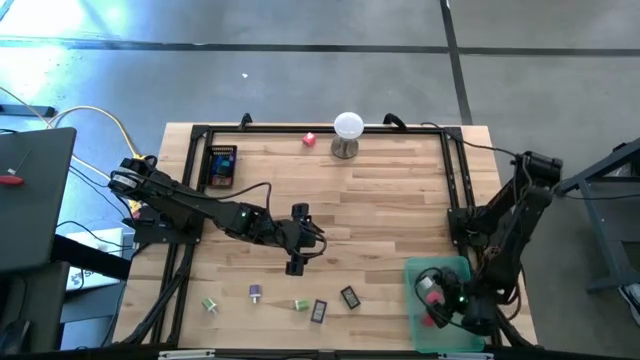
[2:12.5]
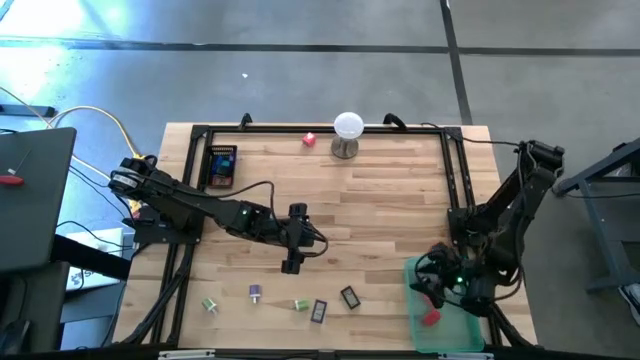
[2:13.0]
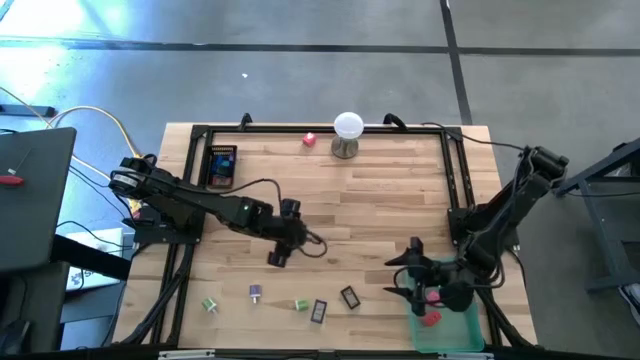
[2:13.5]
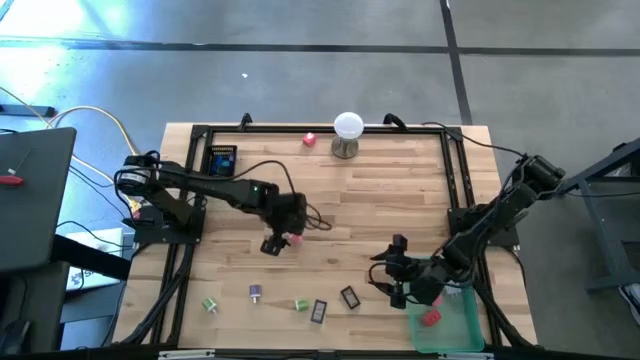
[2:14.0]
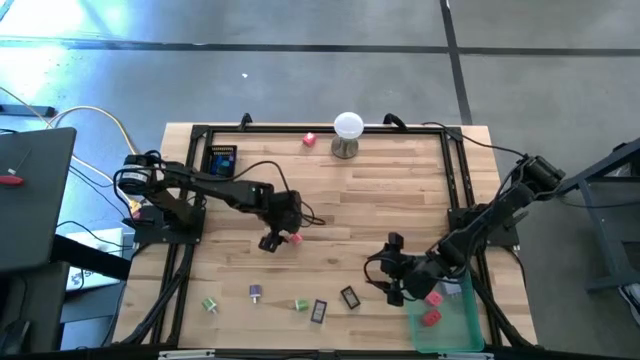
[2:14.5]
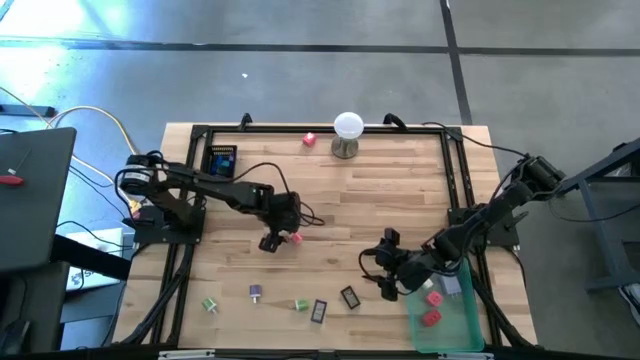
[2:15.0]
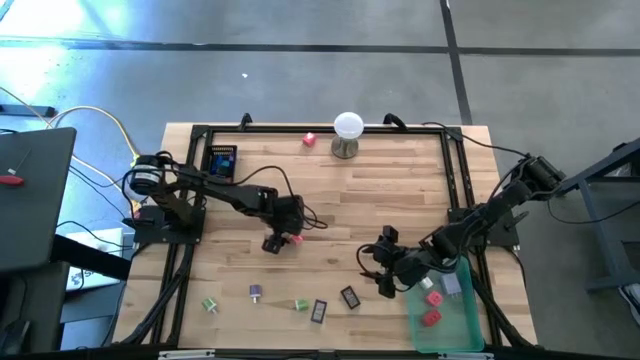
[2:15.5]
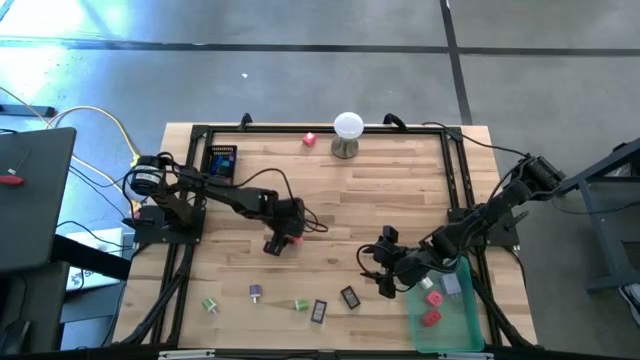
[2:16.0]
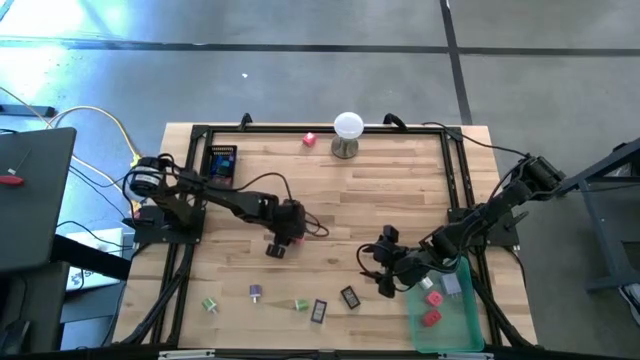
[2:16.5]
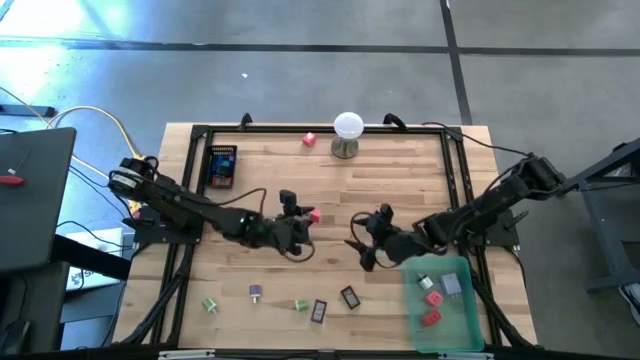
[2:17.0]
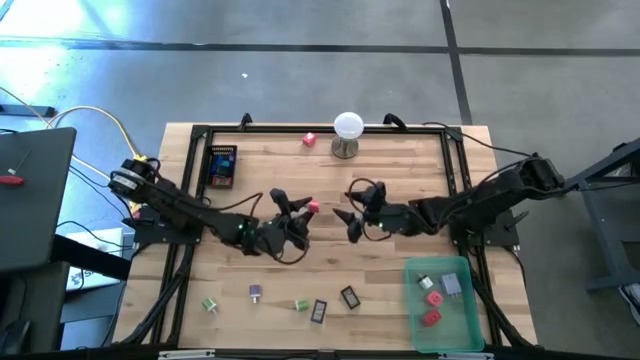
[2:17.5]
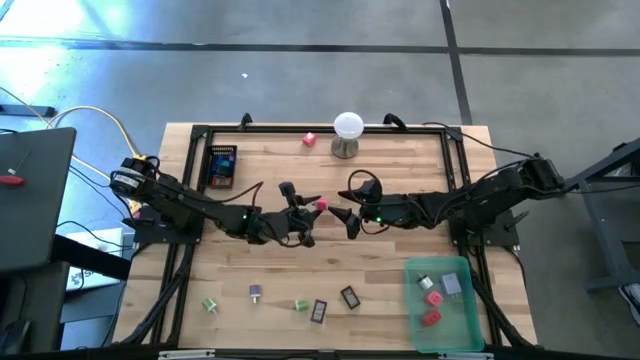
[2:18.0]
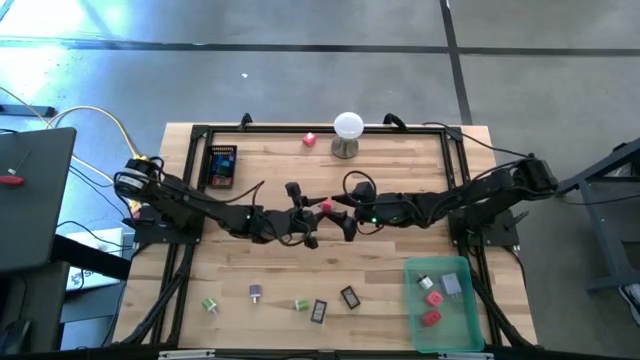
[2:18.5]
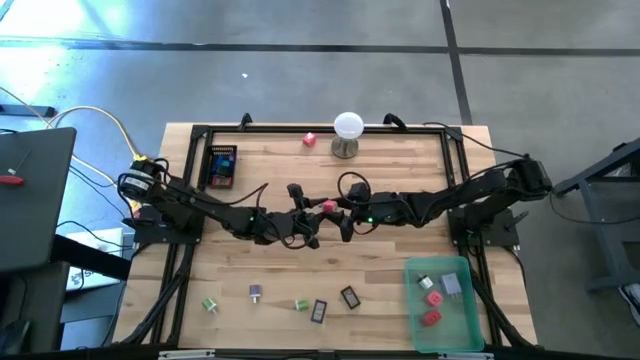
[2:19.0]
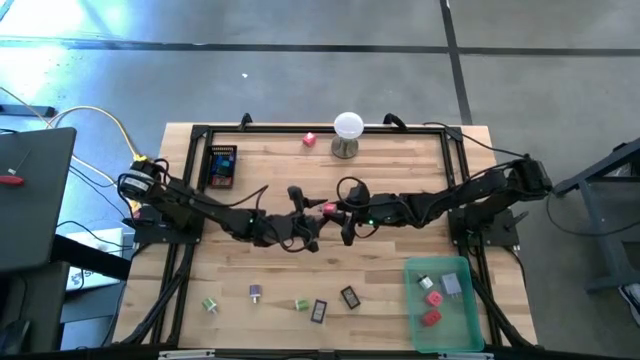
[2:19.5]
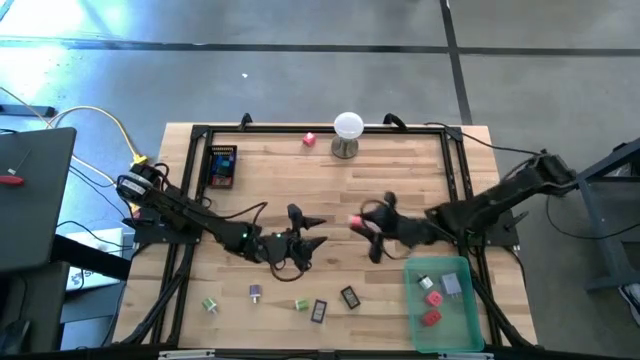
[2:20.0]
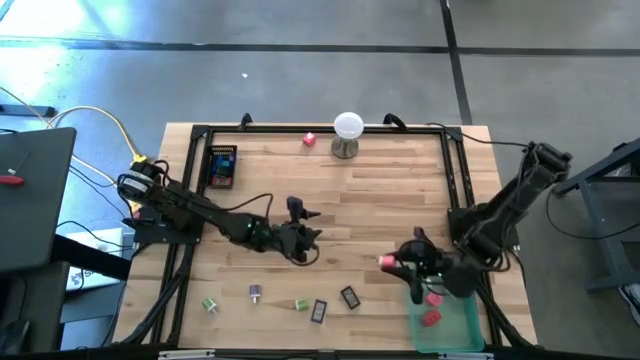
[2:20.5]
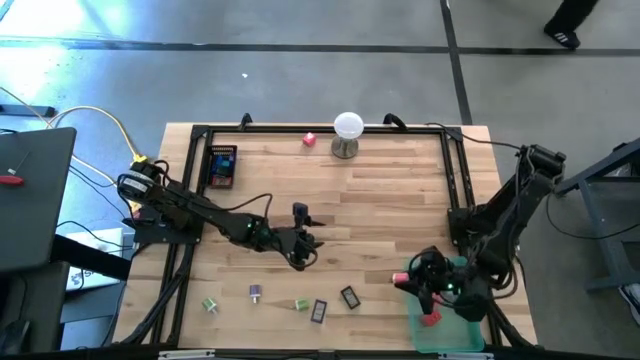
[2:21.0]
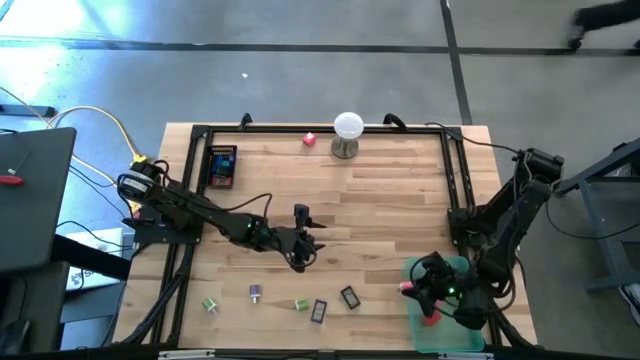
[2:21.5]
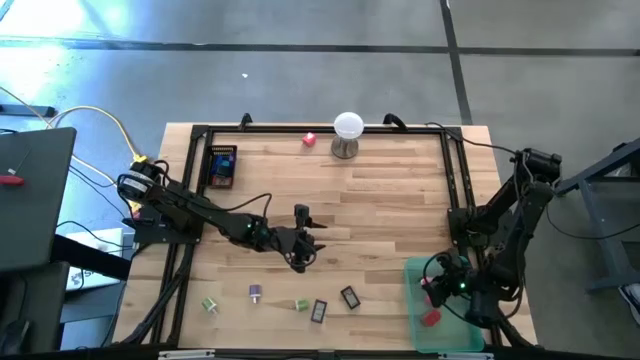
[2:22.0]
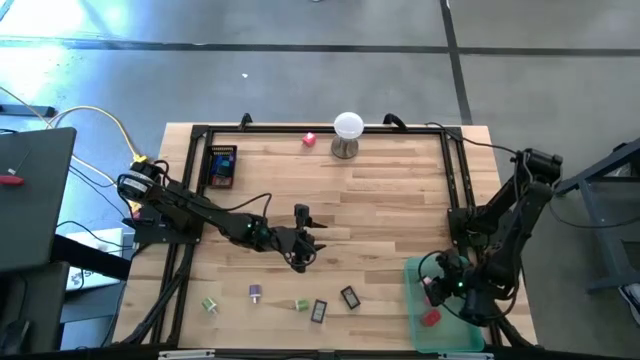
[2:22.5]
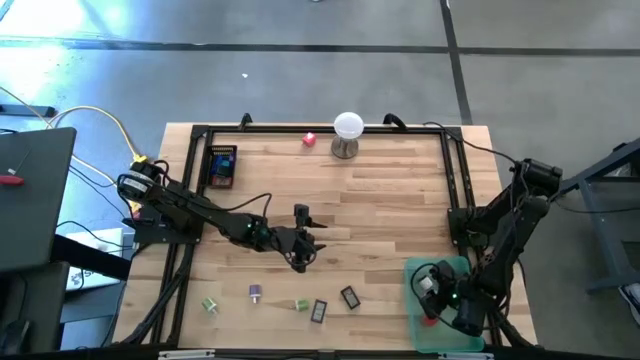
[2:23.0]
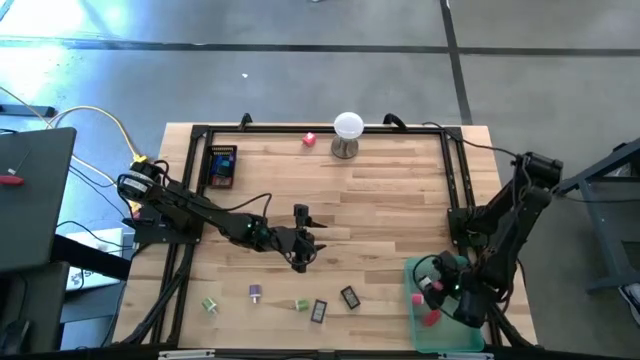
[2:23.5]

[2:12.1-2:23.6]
Task: Pick & Place Office items
Put the white and pink charger adapter into the green bin

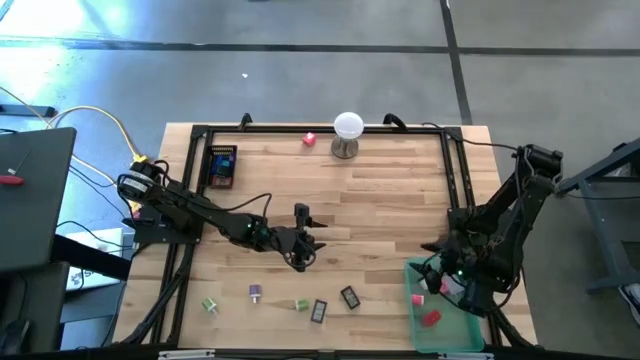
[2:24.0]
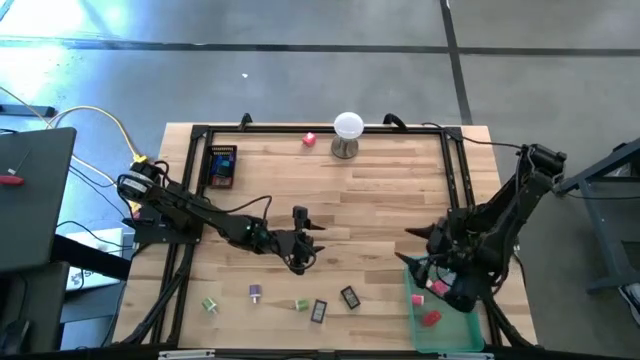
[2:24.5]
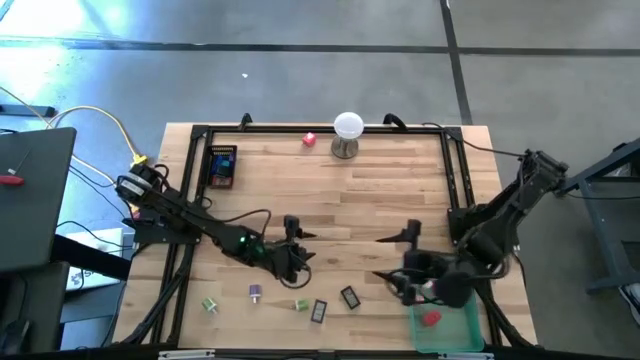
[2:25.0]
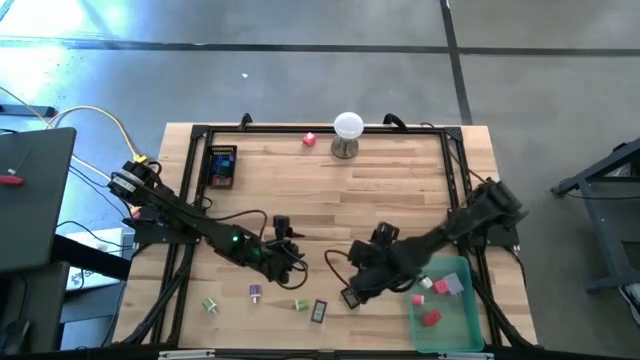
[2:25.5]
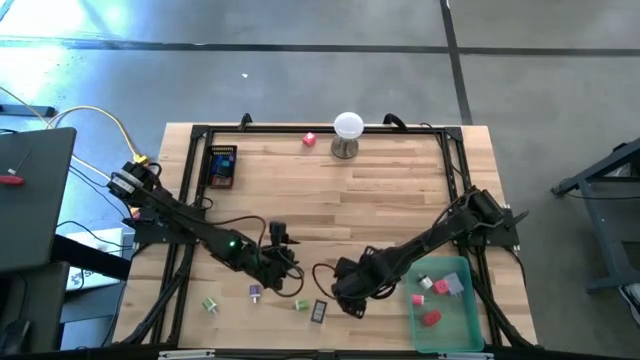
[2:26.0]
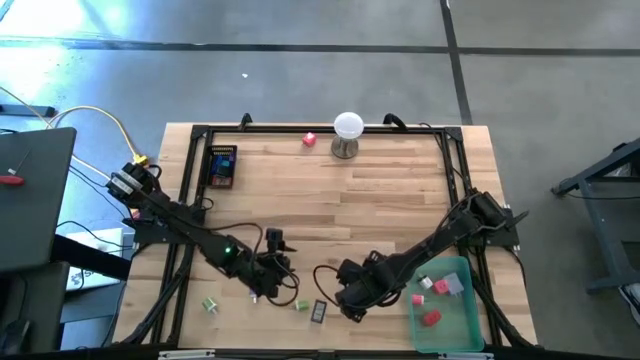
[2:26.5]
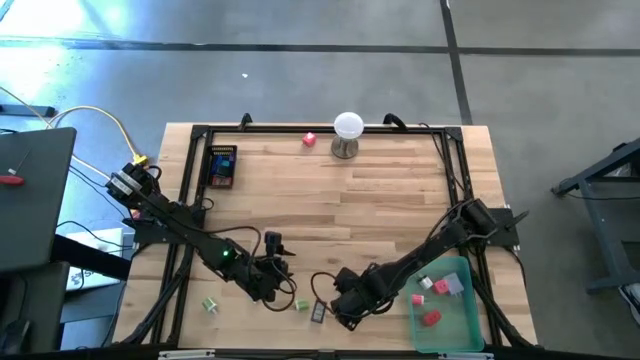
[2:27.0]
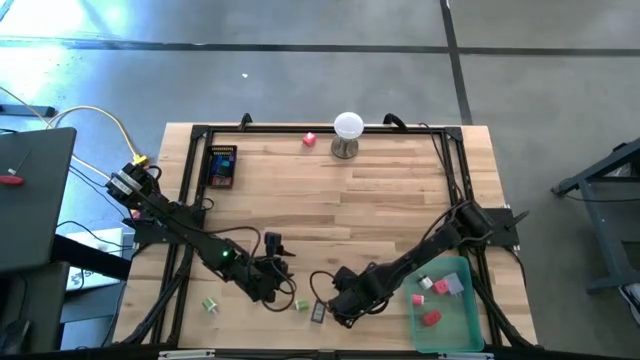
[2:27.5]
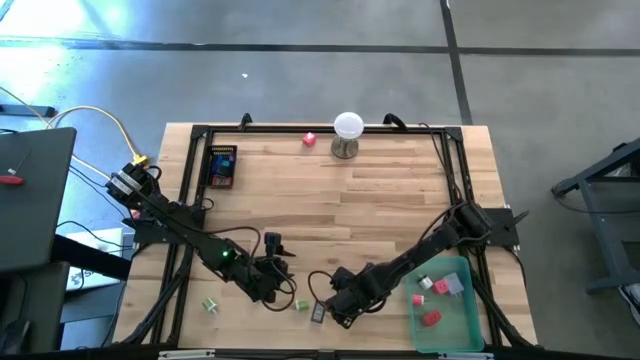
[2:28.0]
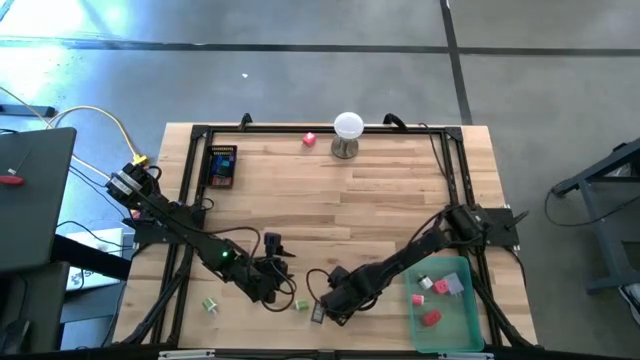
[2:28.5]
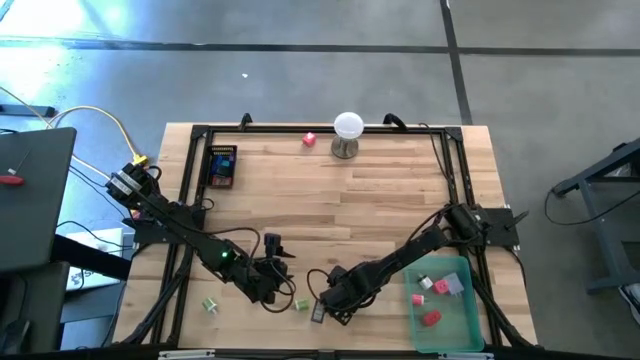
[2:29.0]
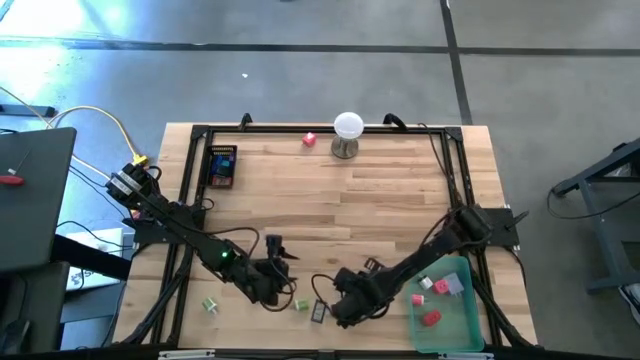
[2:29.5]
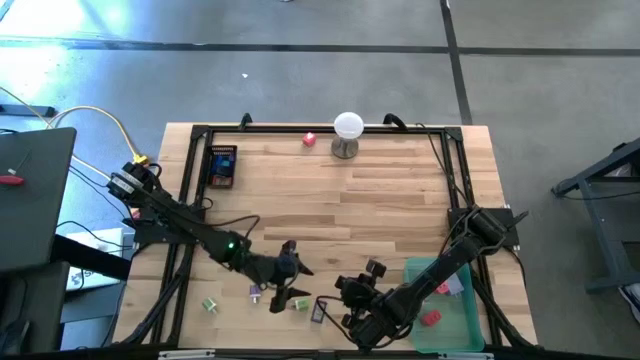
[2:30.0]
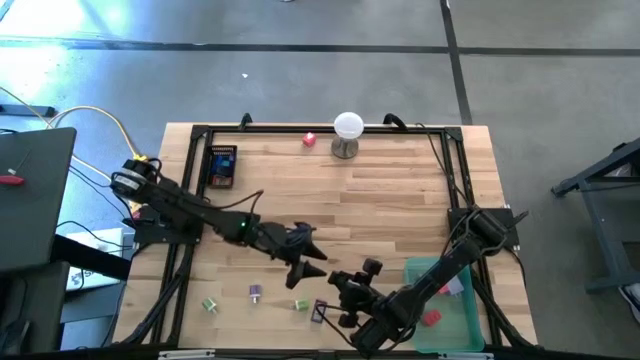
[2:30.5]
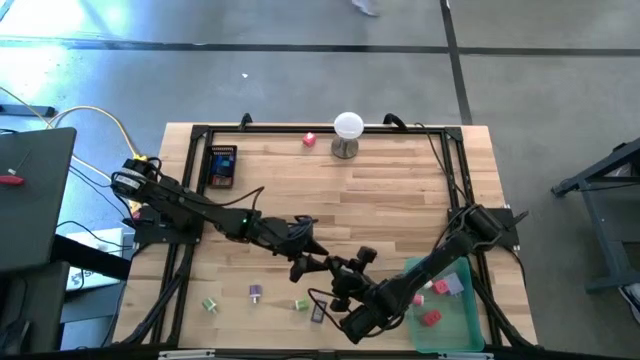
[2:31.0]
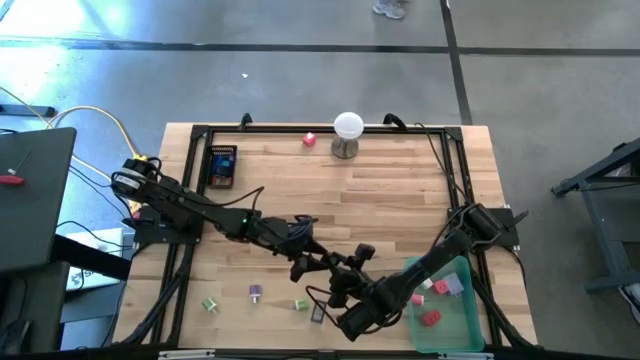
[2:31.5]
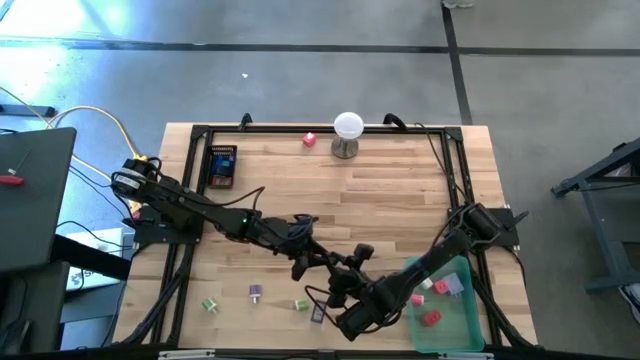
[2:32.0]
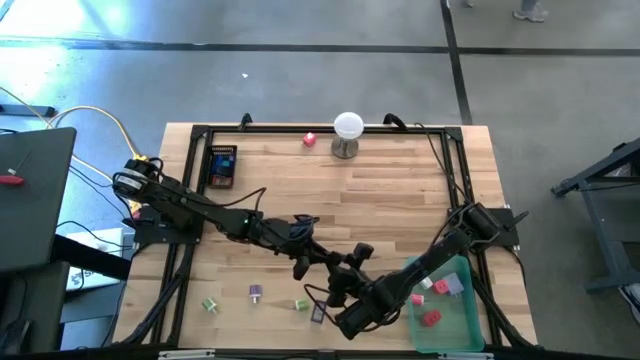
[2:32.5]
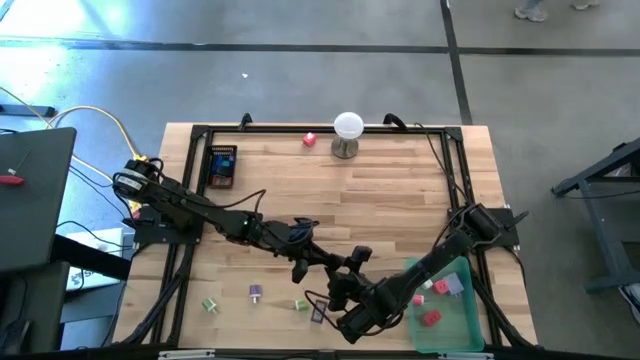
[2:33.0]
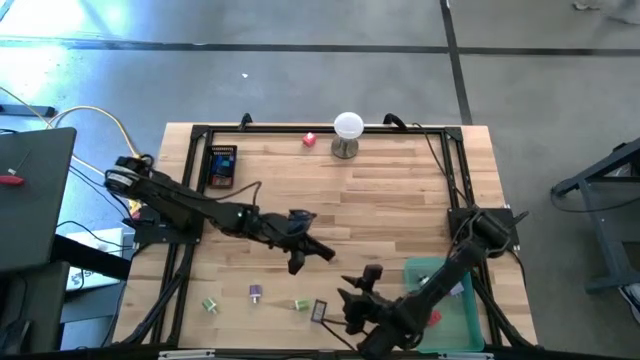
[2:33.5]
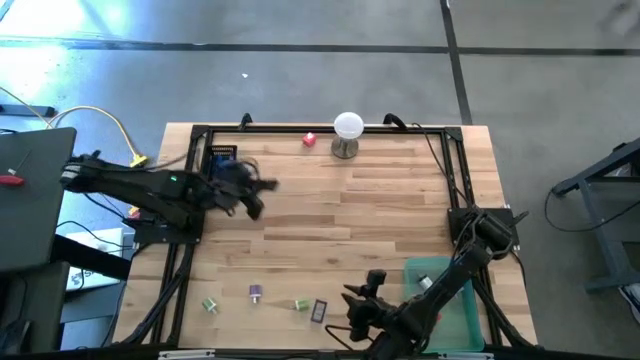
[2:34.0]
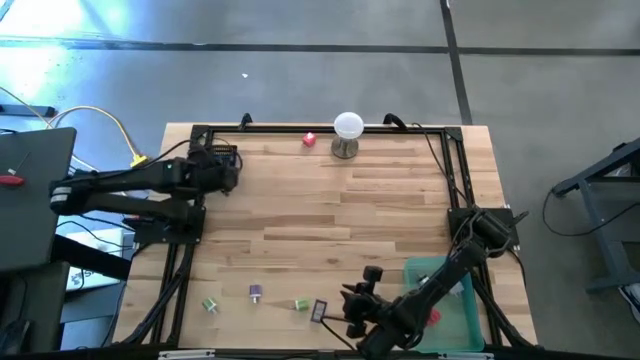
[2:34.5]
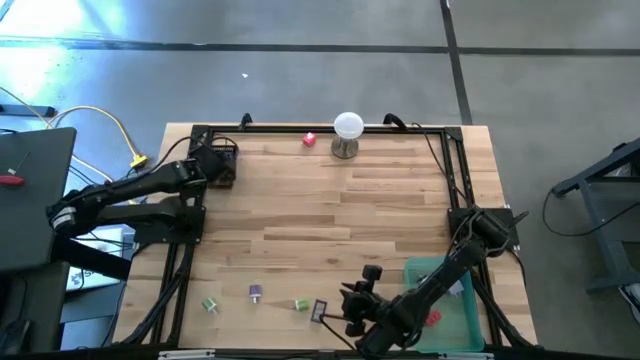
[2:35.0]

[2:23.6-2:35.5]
Put the black digital clock into the black bin
